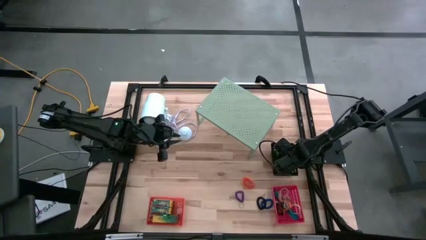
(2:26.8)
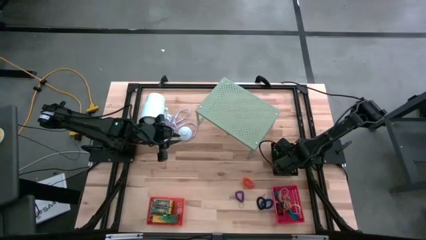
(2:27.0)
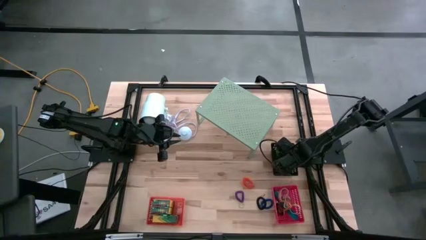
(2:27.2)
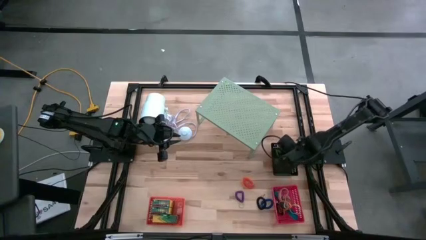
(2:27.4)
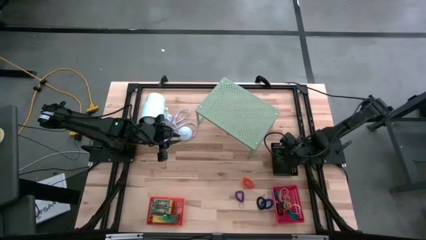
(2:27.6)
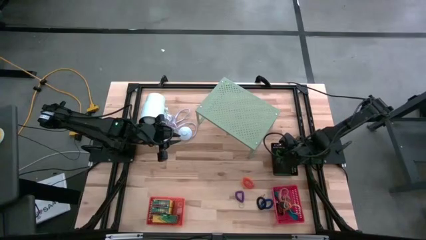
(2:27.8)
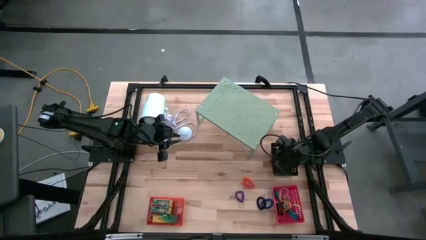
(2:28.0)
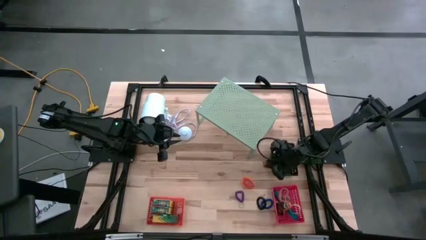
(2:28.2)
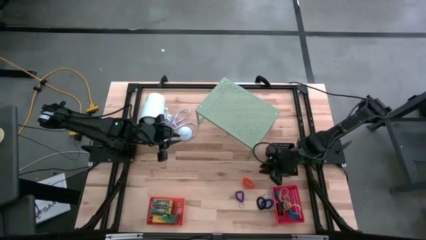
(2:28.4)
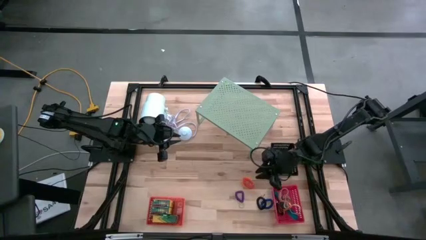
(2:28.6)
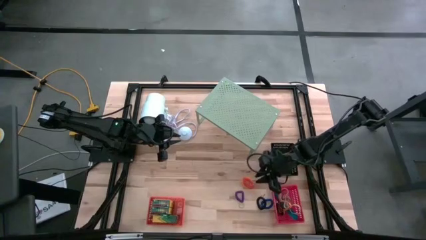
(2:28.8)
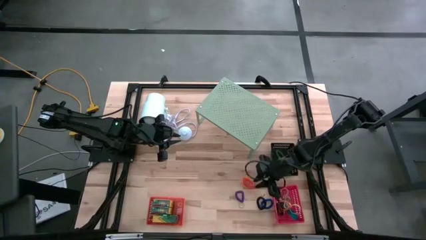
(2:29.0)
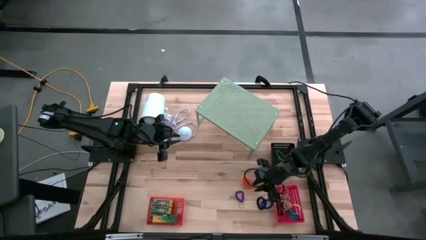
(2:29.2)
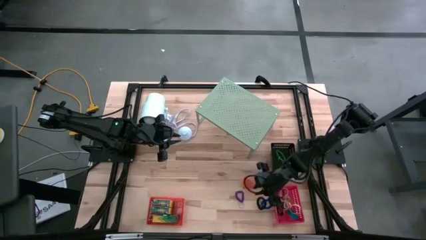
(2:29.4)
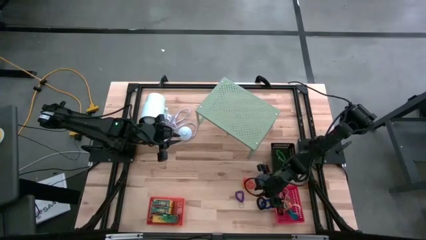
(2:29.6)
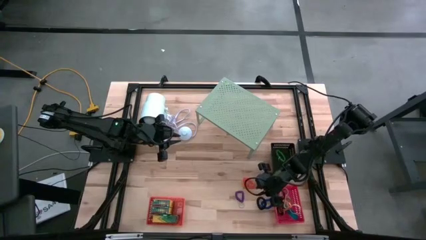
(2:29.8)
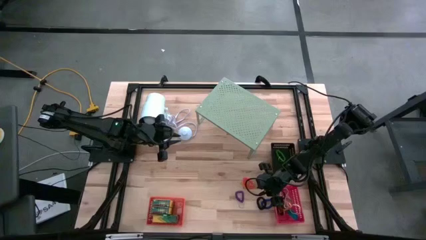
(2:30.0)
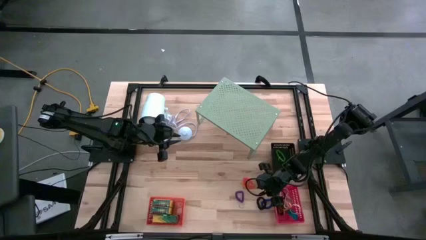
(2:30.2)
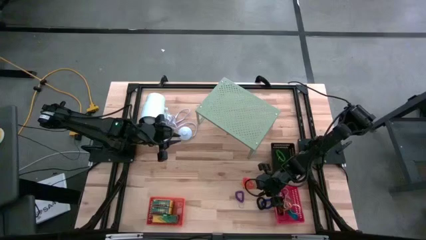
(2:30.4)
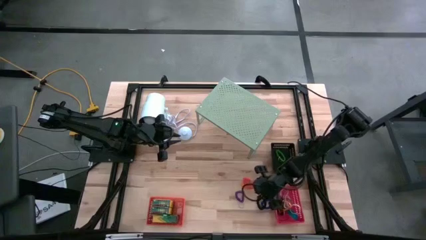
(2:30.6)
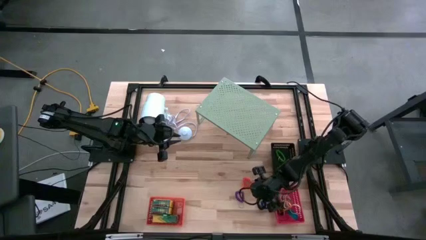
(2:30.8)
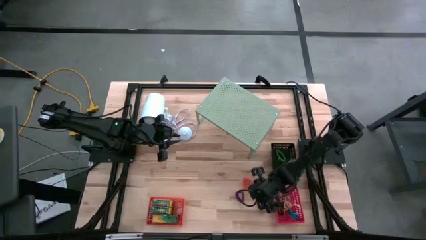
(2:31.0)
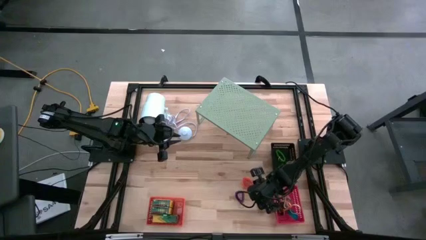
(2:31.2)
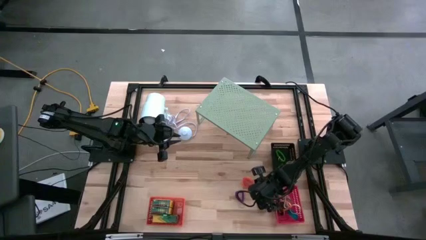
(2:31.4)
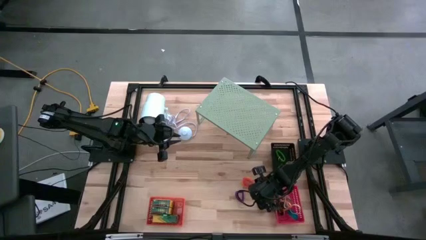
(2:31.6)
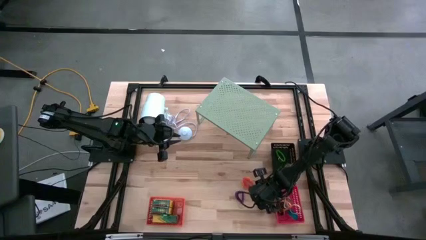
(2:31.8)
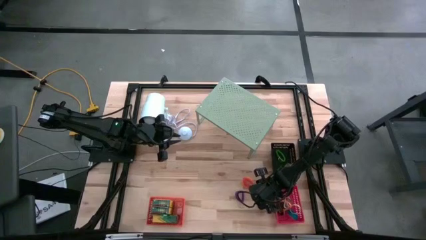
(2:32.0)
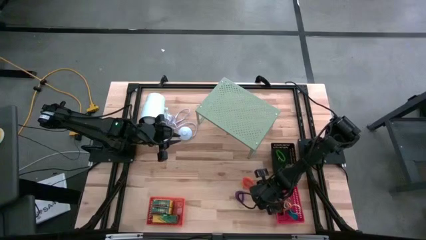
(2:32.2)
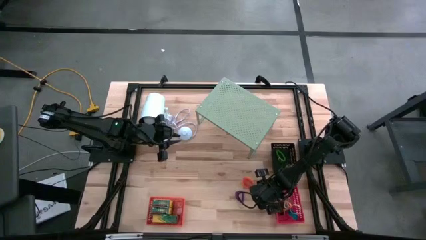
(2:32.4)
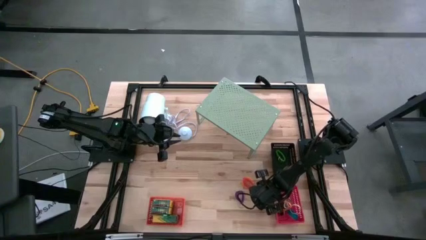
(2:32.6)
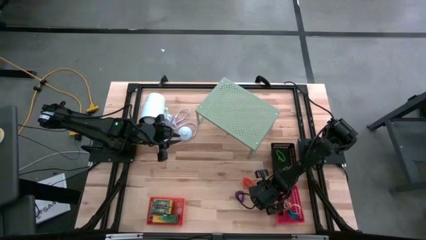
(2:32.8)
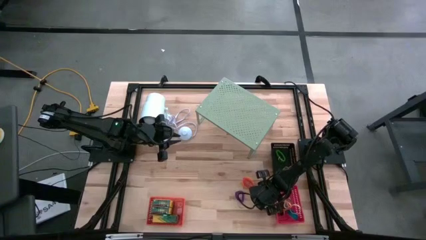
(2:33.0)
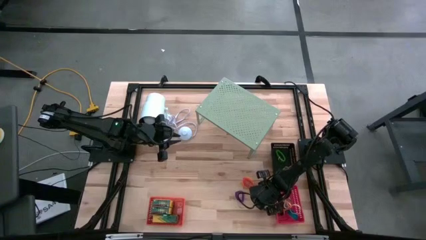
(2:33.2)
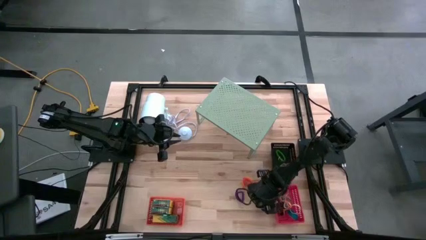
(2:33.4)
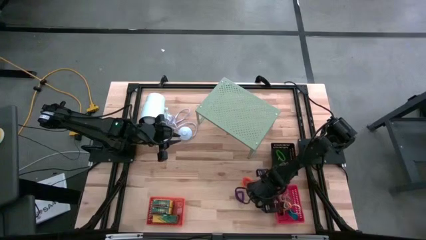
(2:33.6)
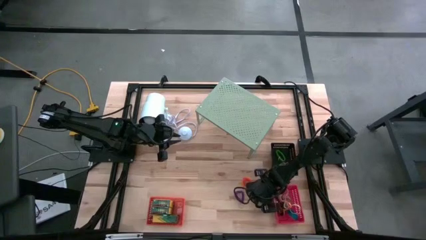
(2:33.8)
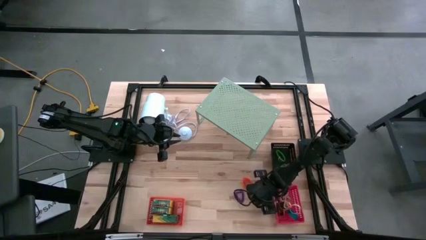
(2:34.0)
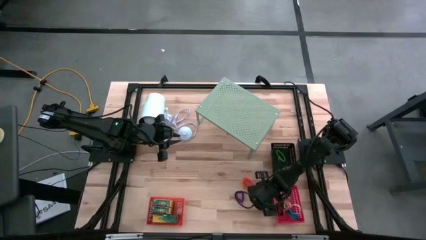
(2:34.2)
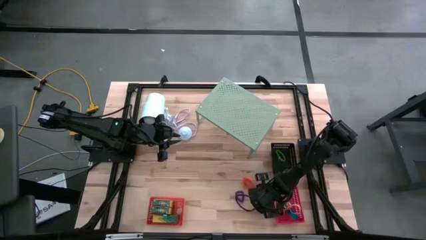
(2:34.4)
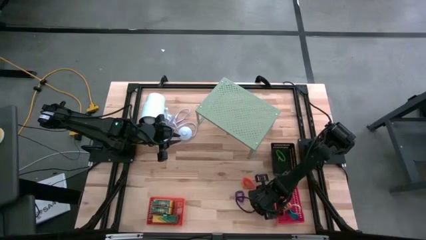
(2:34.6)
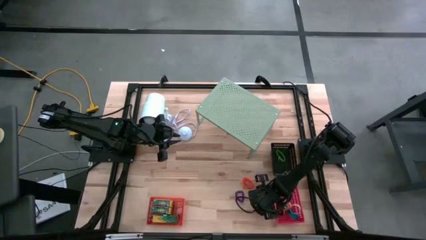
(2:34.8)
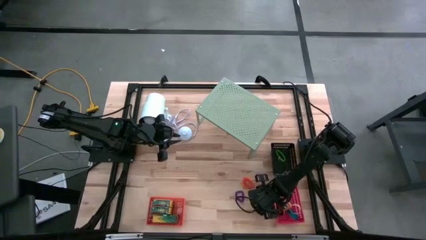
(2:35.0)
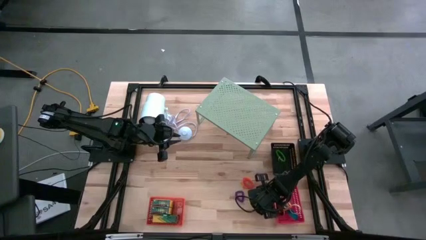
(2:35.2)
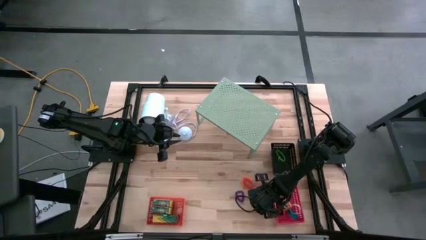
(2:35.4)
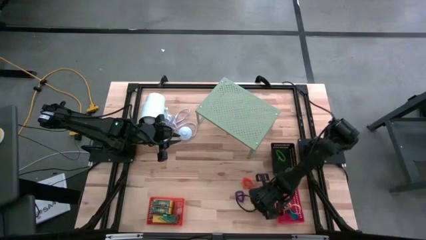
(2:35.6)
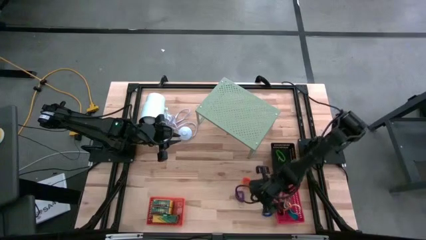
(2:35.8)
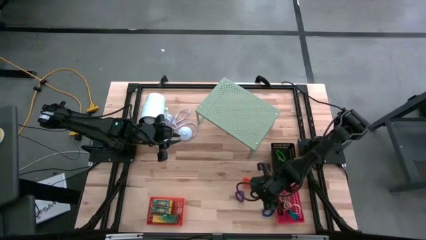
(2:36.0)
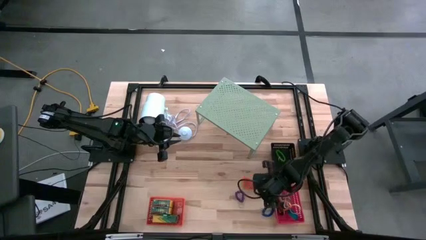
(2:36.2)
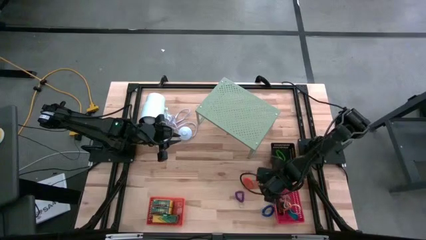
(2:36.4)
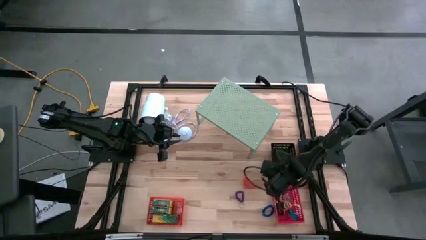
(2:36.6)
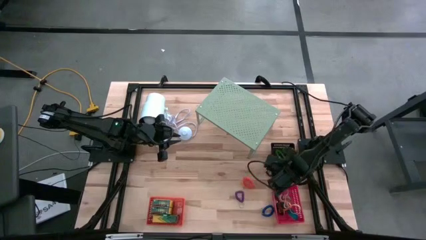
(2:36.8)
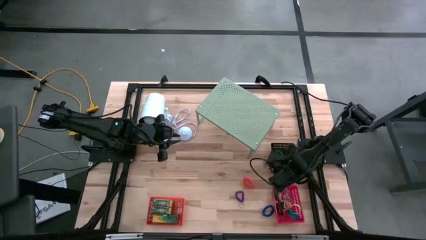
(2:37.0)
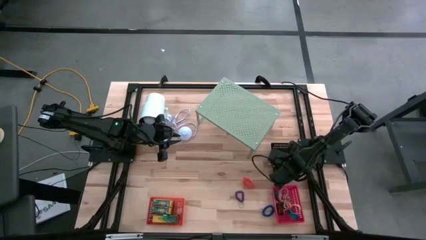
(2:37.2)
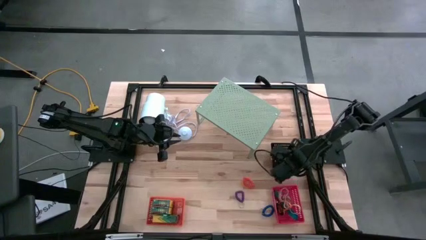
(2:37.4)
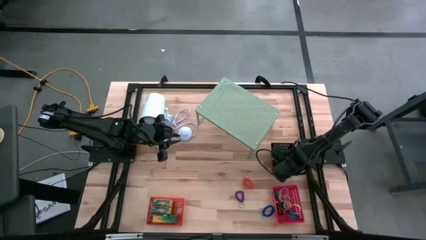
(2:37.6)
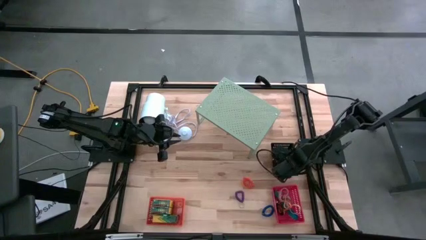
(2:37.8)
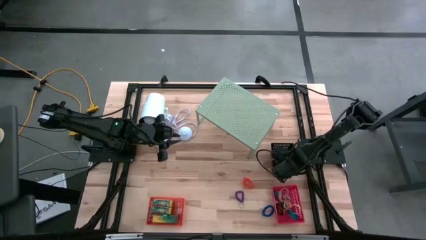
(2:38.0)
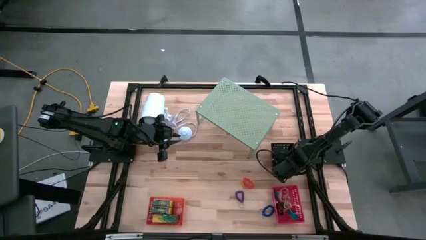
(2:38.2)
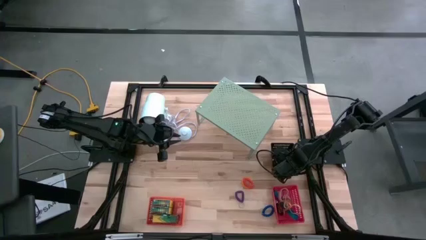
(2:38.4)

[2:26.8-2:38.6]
Task: Pick & Place Office Desk Supplies
Put the black spring keychain into the black bin
